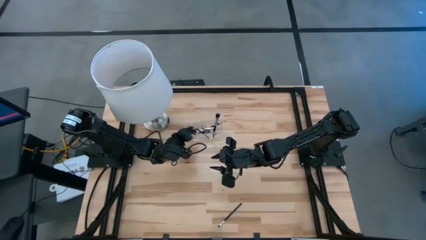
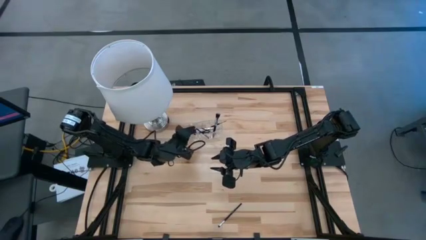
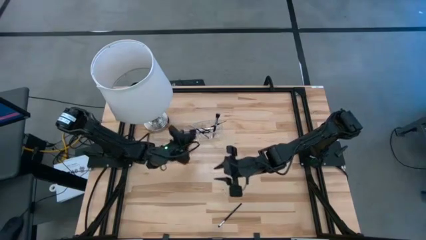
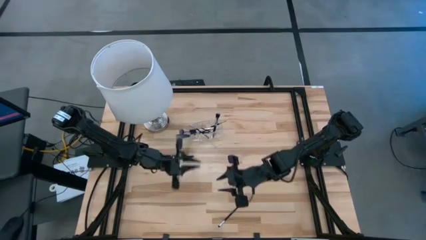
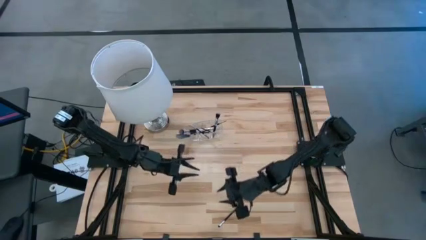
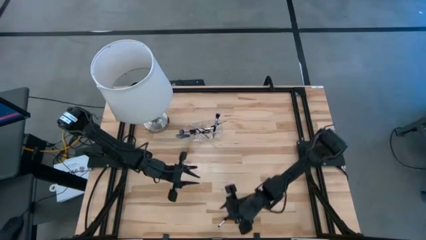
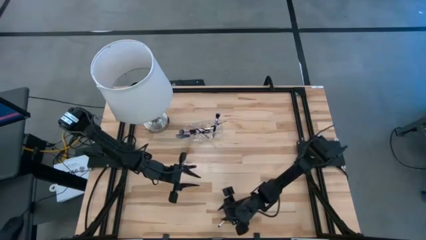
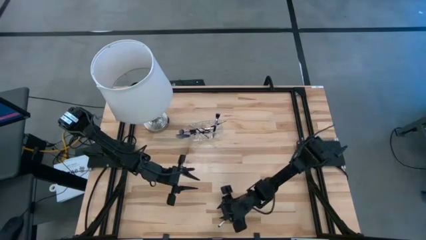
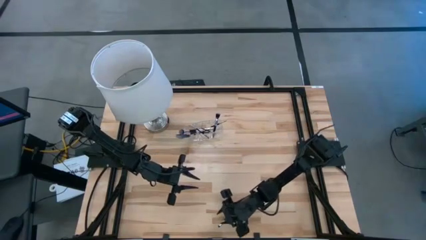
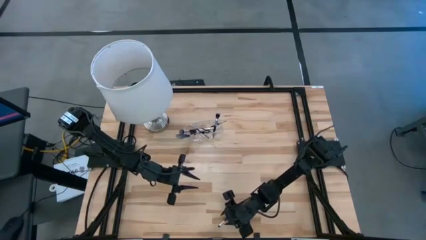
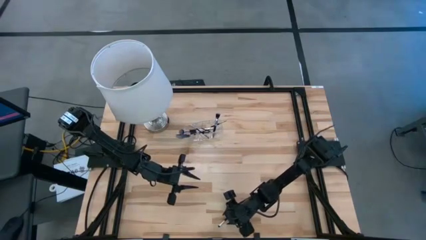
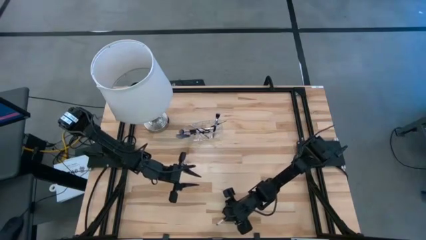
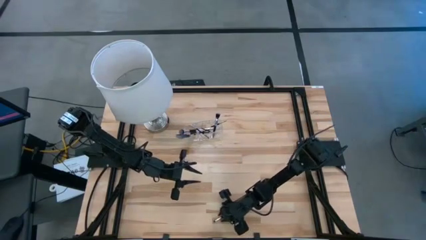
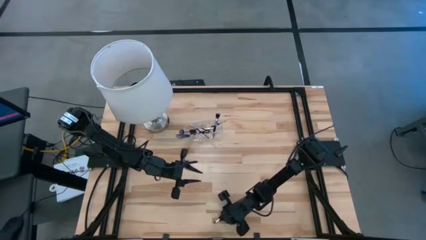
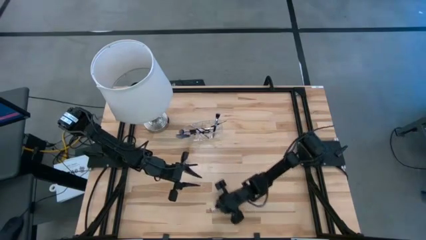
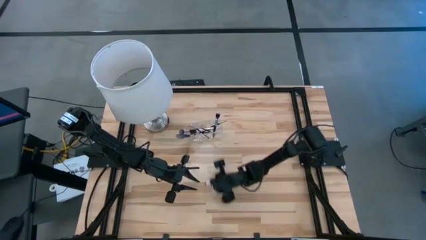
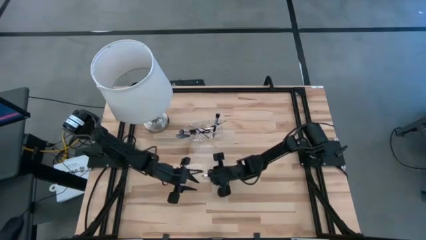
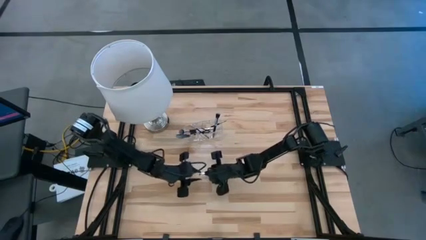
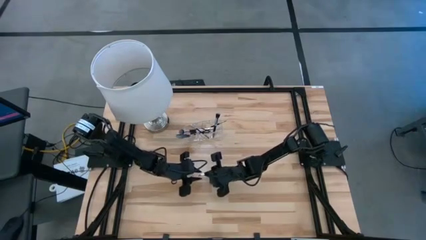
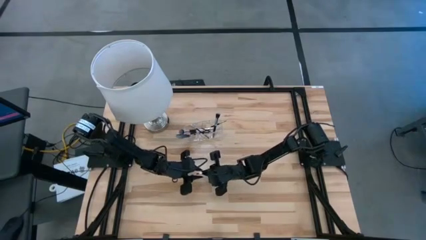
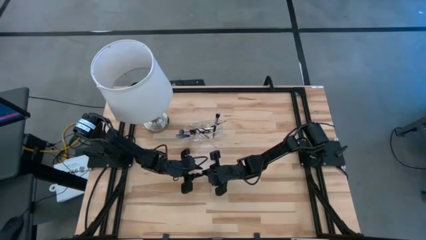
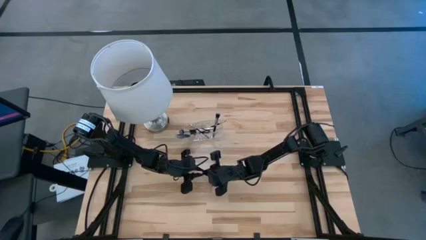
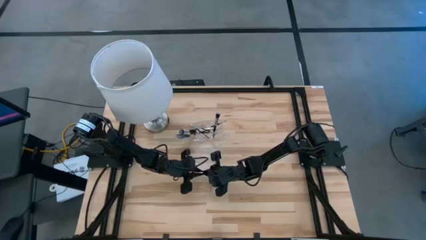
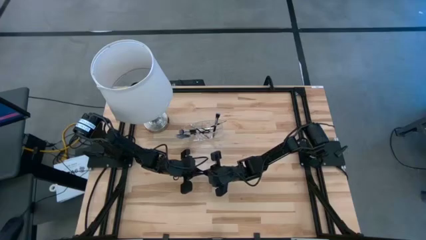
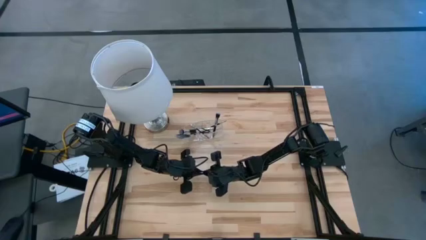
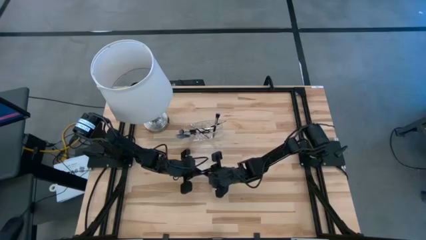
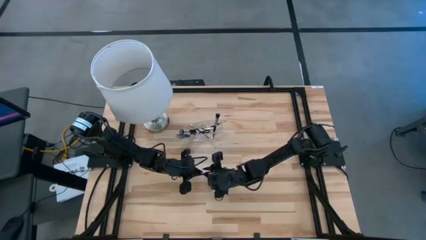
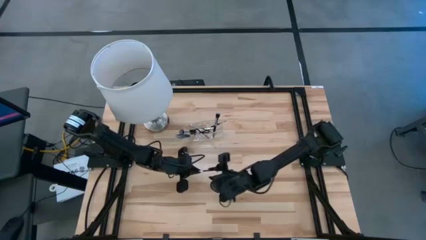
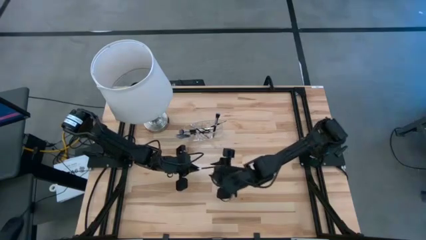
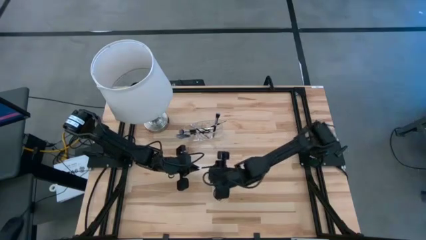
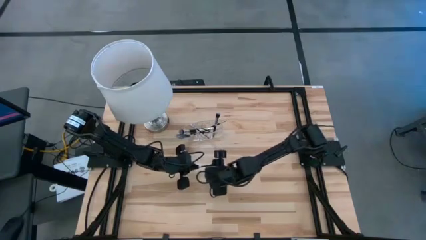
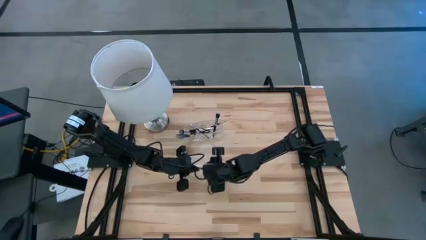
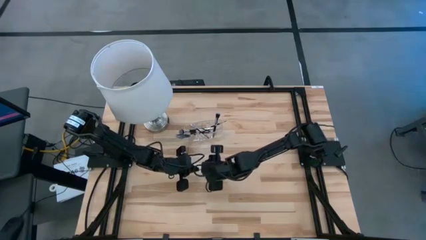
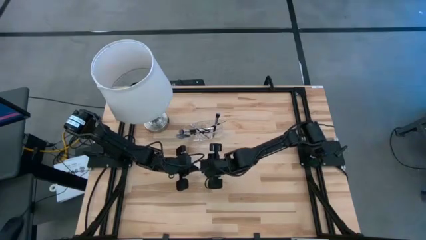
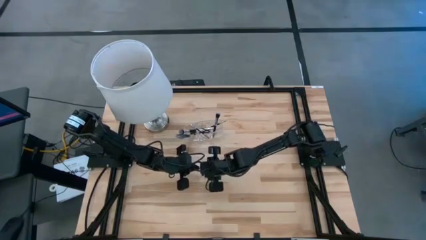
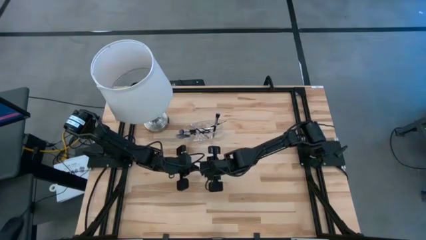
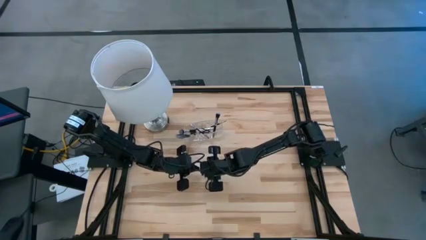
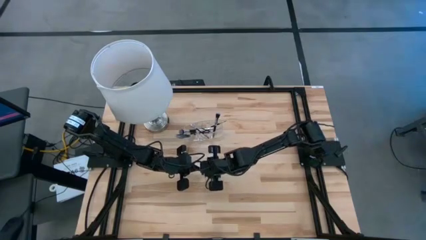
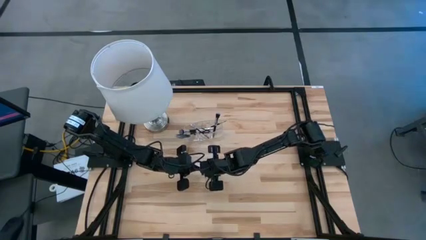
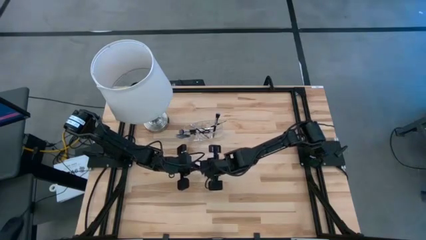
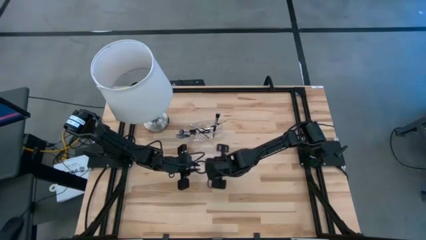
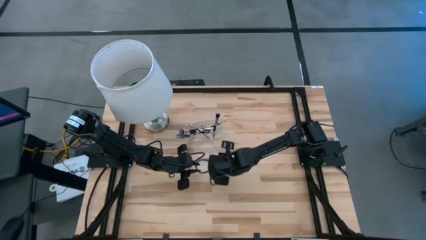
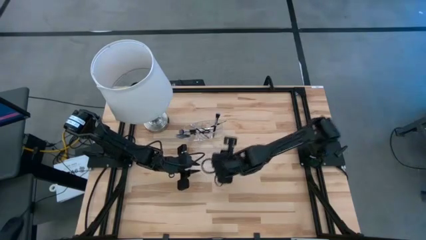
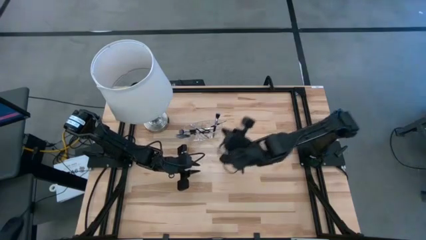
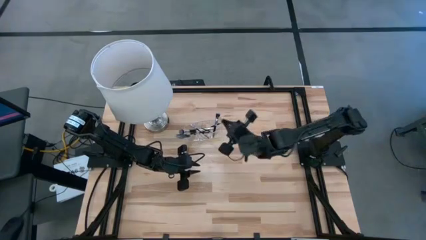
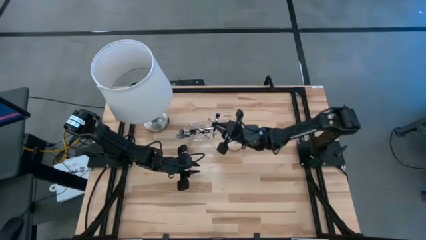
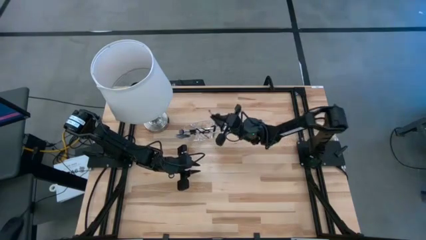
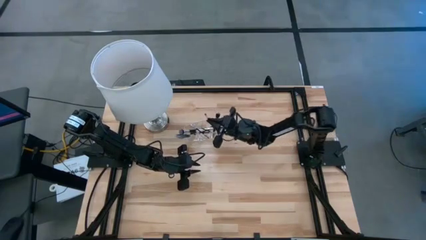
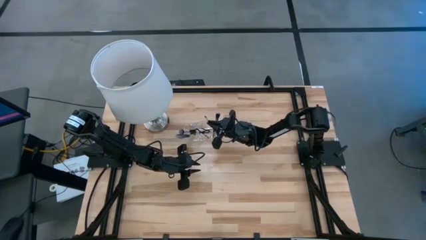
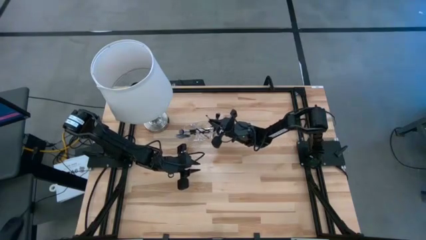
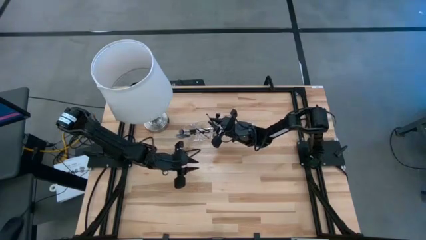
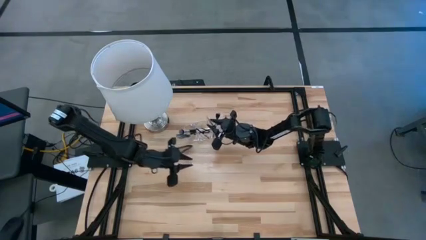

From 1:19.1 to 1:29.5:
Task: Put items in baskets/containers
Put the black eyeshadow brush into the transparent organizer

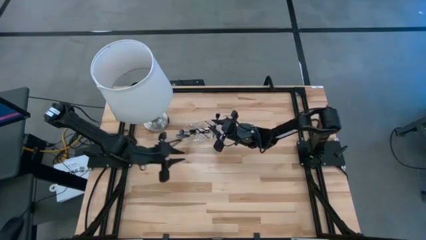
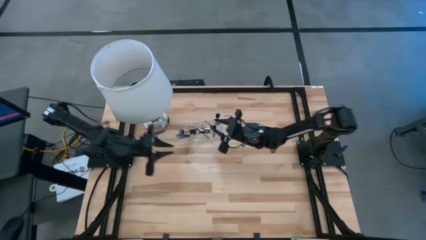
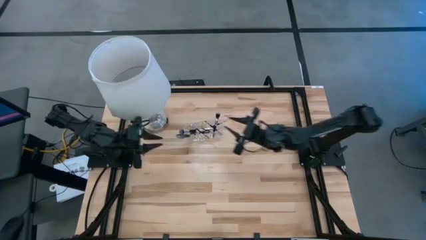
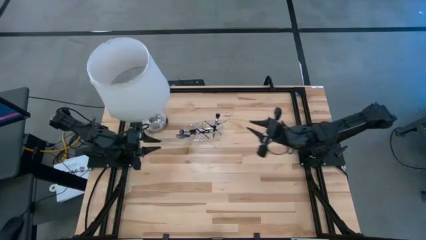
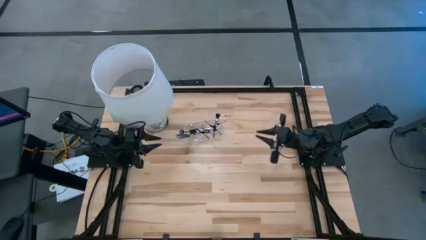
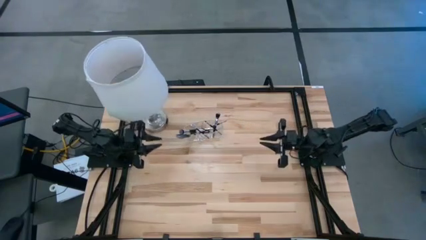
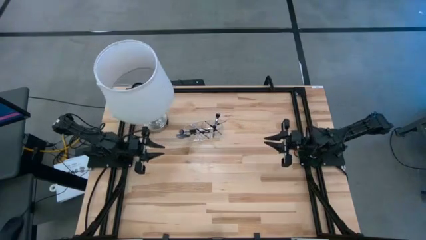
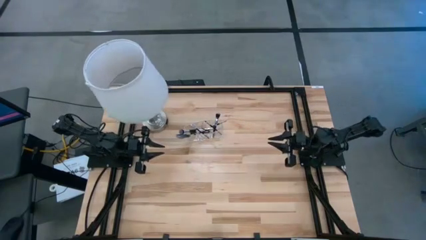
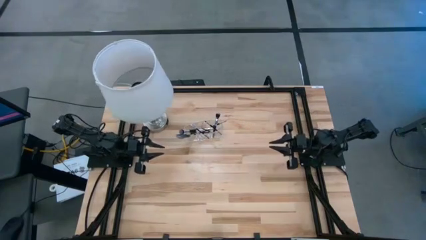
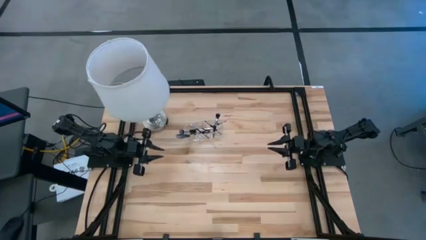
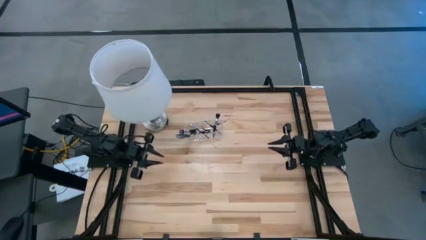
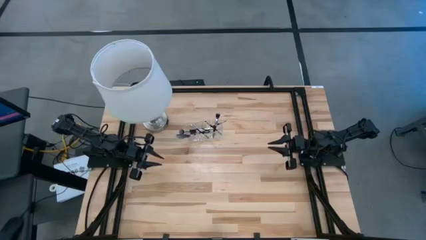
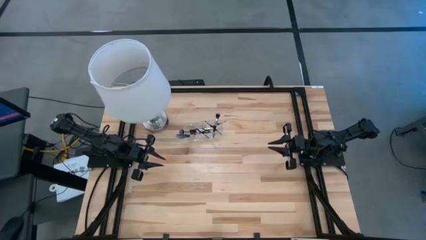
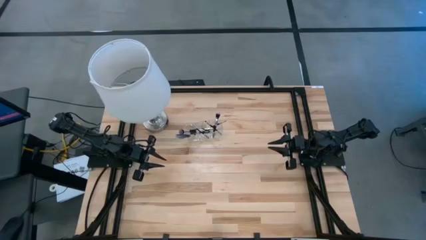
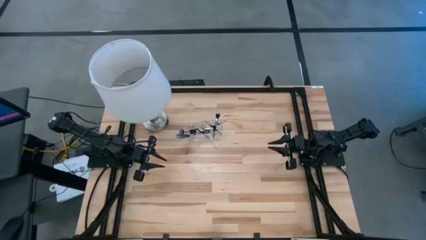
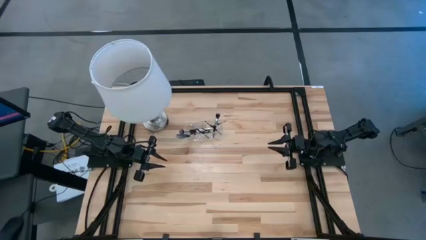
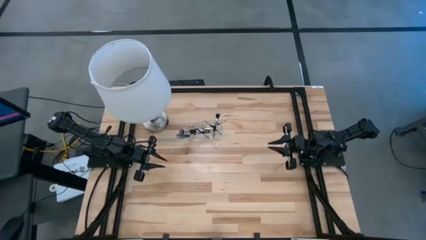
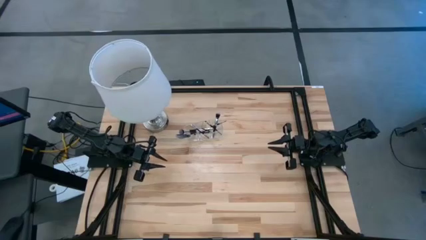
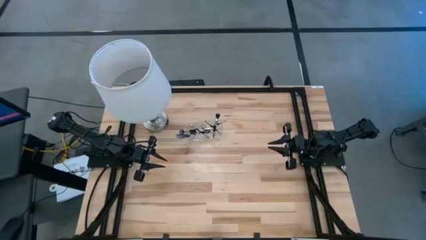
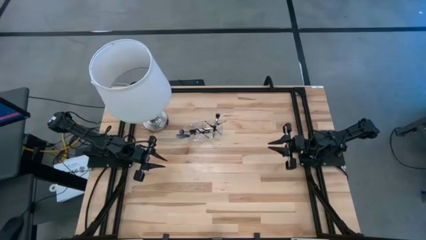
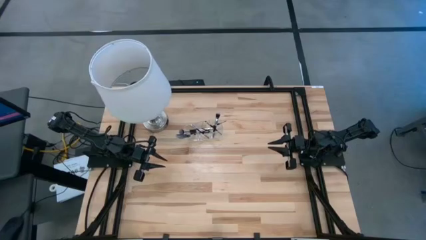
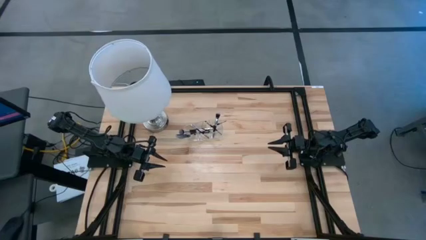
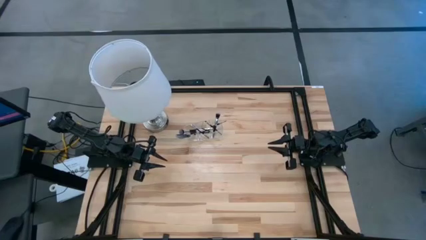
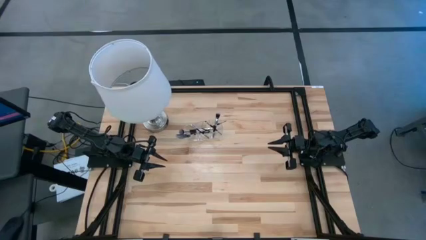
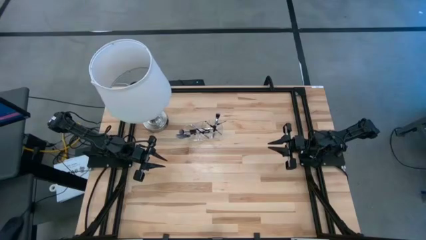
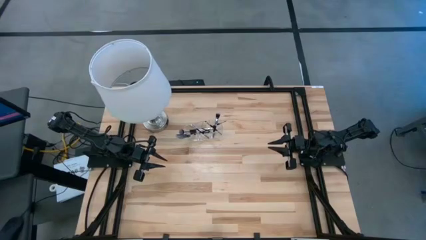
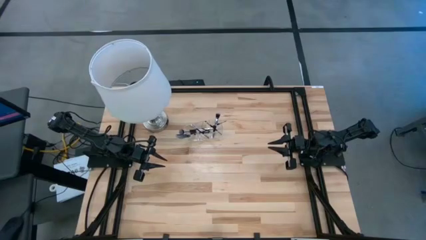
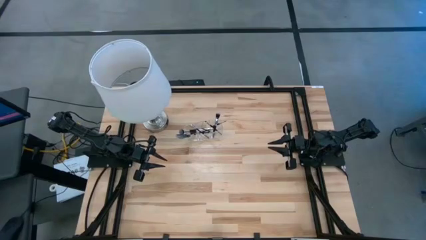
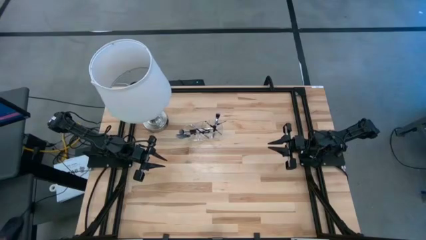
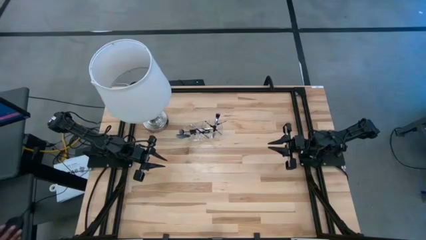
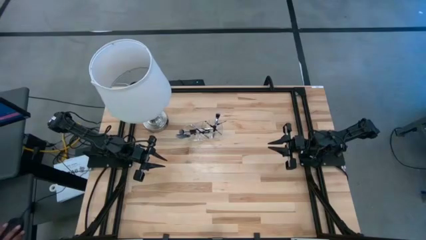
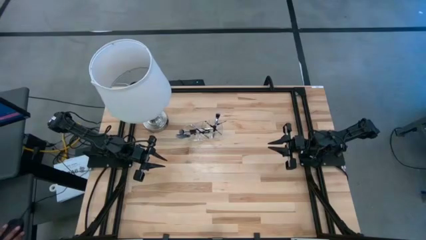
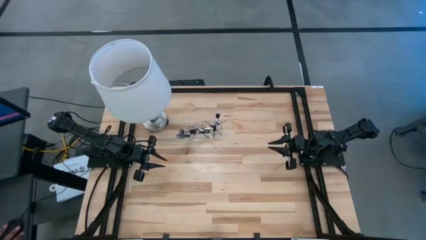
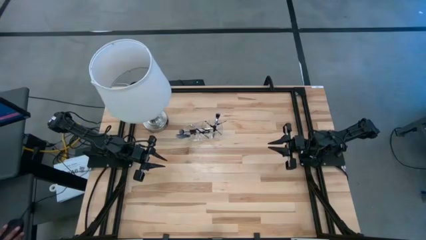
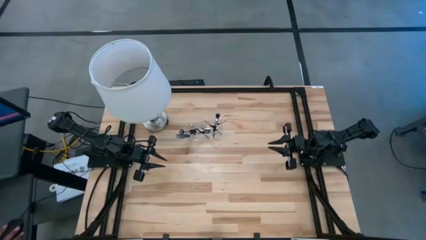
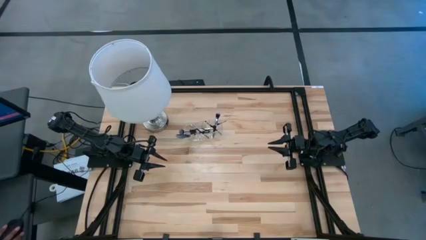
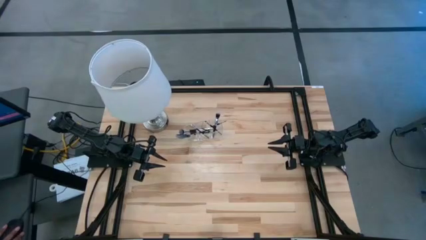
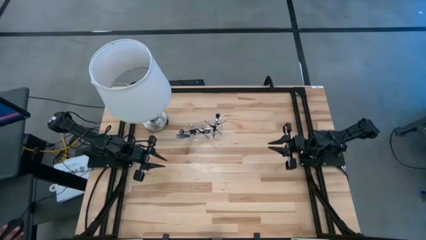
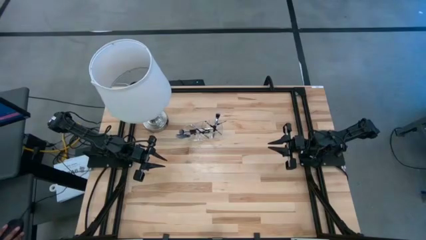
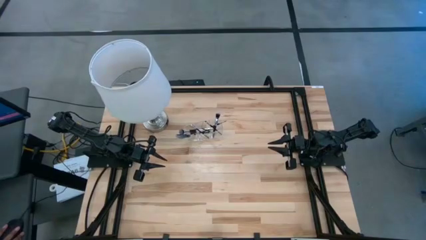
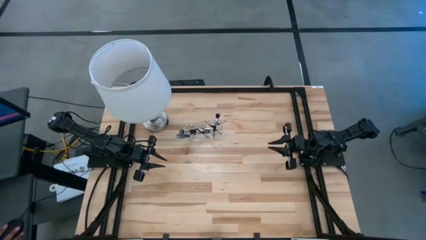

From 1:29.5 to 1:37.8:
Return to home position
